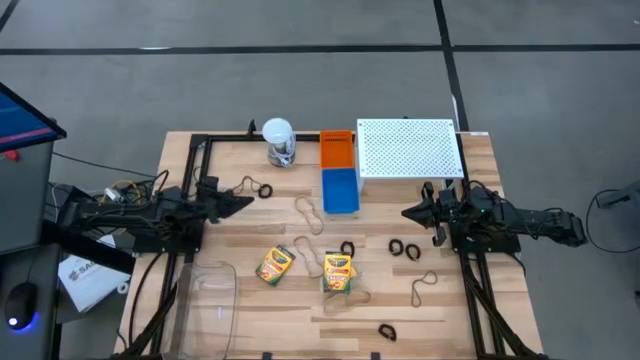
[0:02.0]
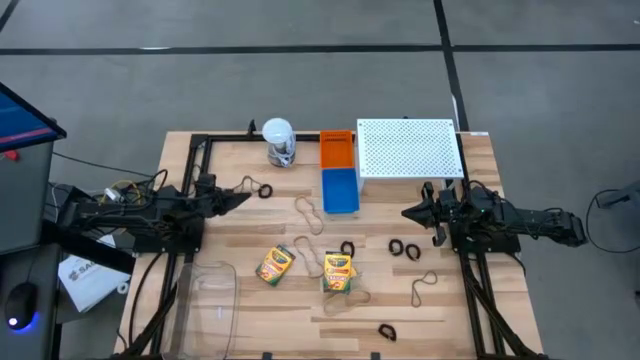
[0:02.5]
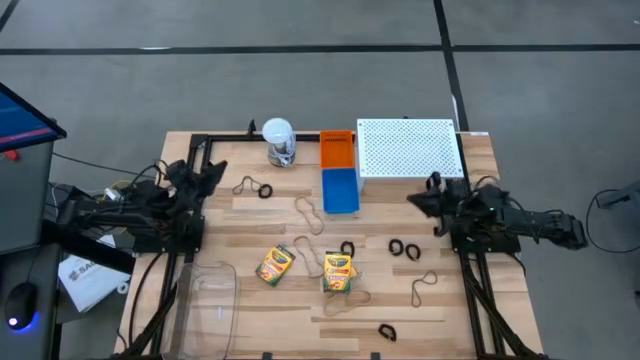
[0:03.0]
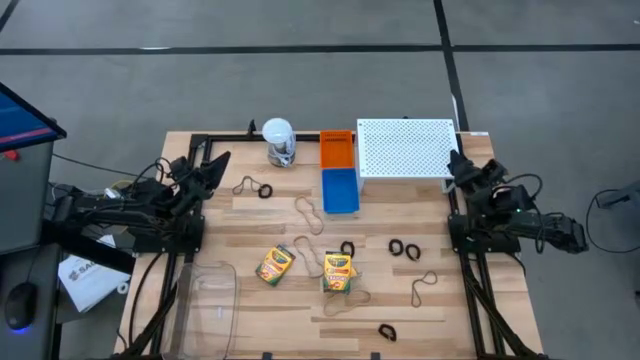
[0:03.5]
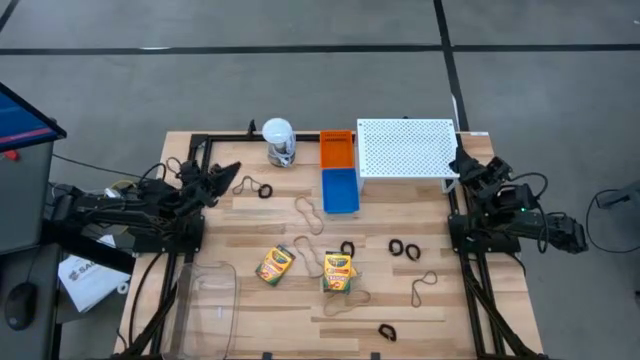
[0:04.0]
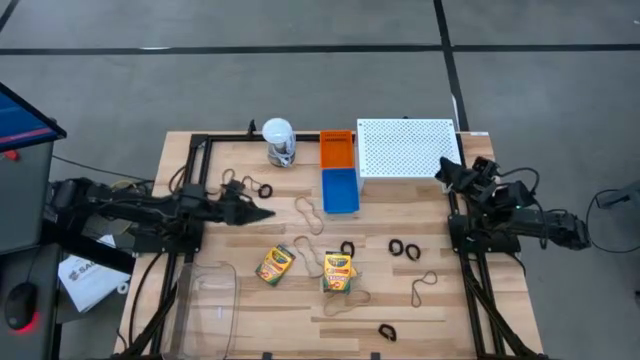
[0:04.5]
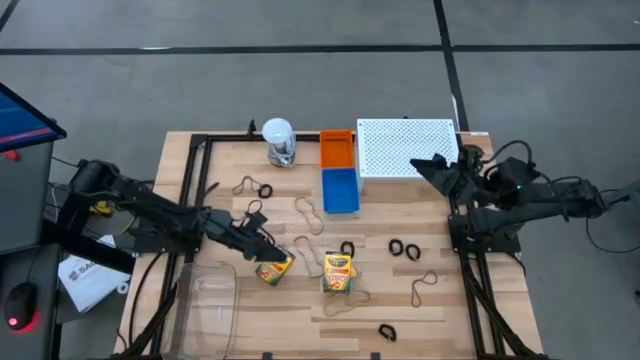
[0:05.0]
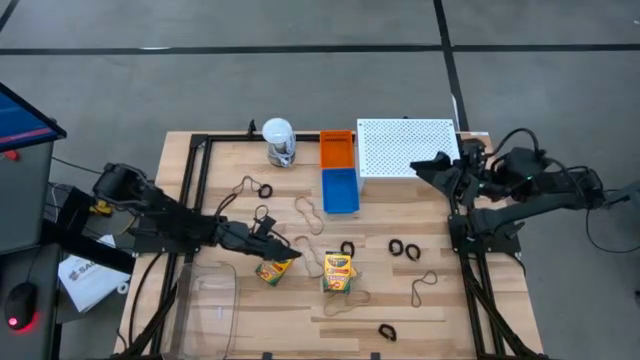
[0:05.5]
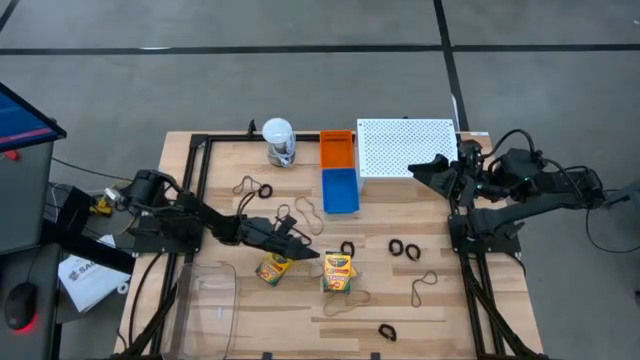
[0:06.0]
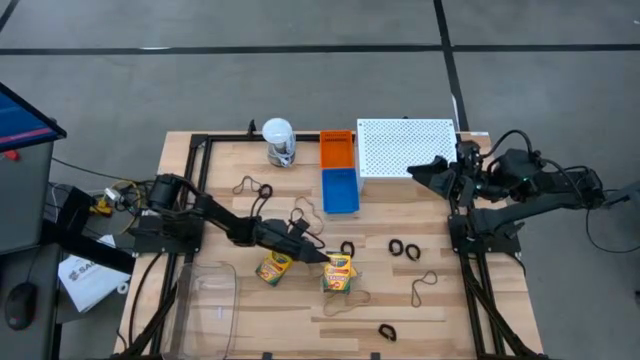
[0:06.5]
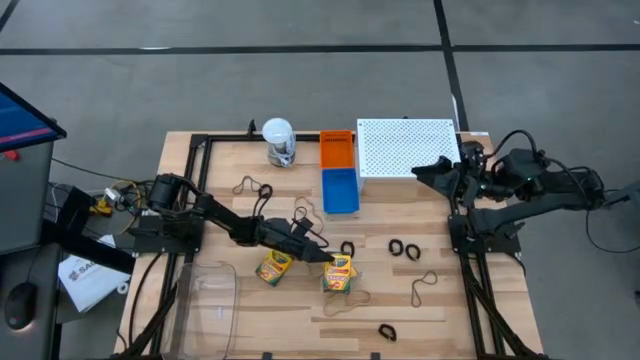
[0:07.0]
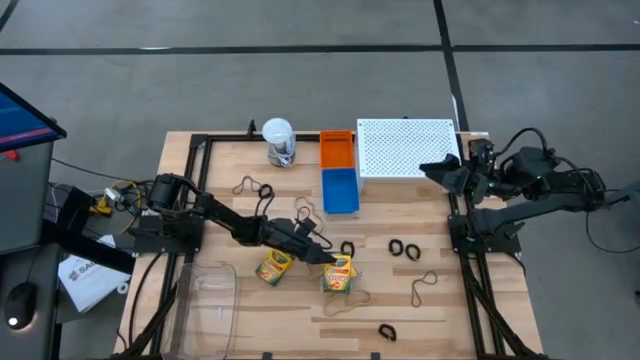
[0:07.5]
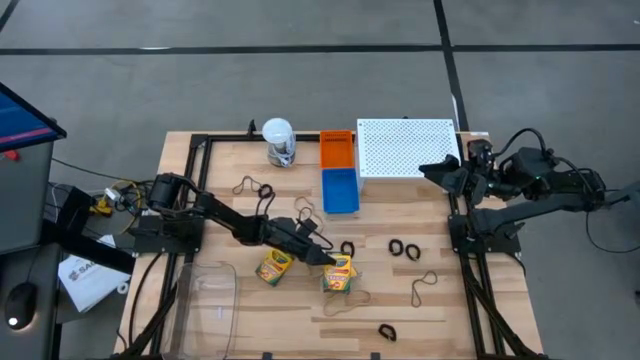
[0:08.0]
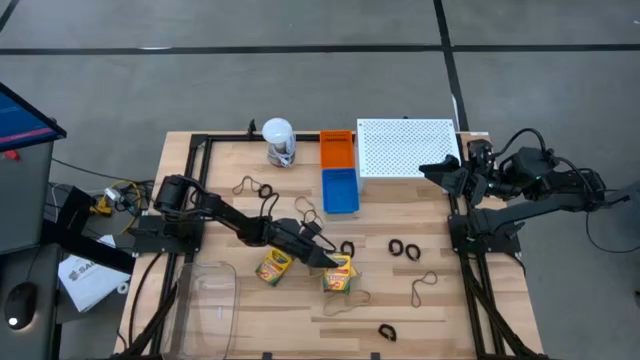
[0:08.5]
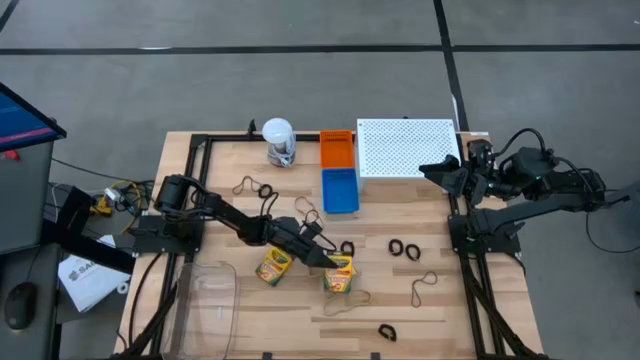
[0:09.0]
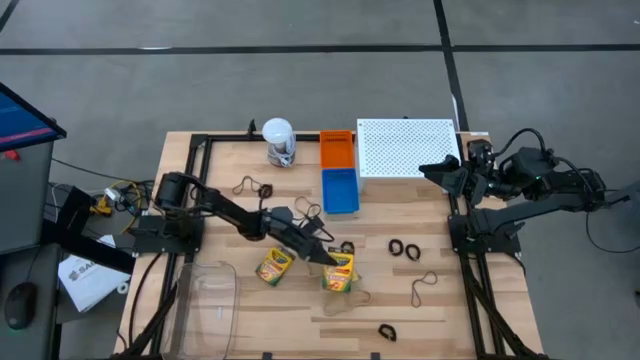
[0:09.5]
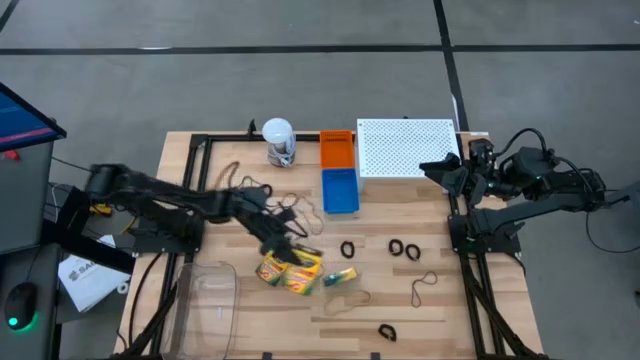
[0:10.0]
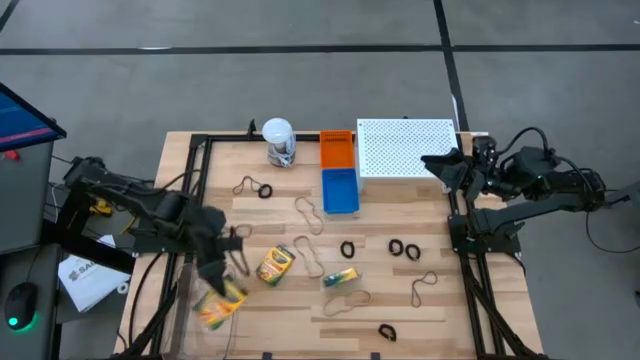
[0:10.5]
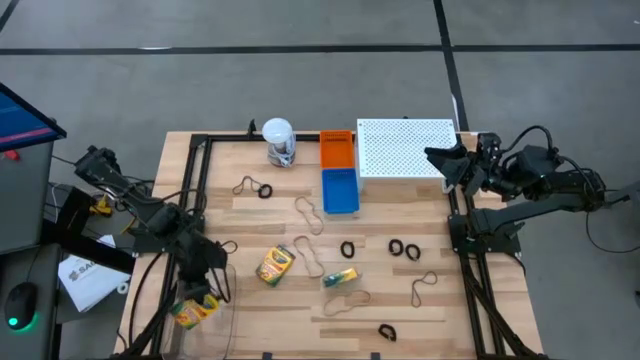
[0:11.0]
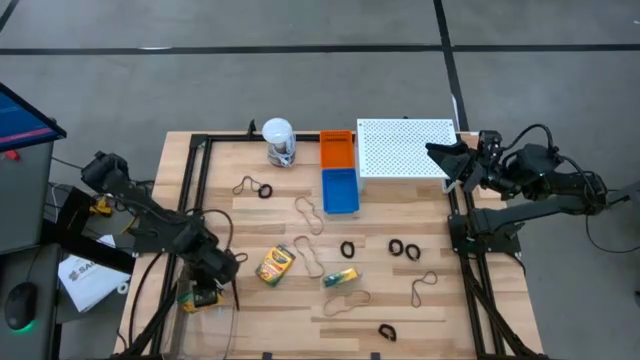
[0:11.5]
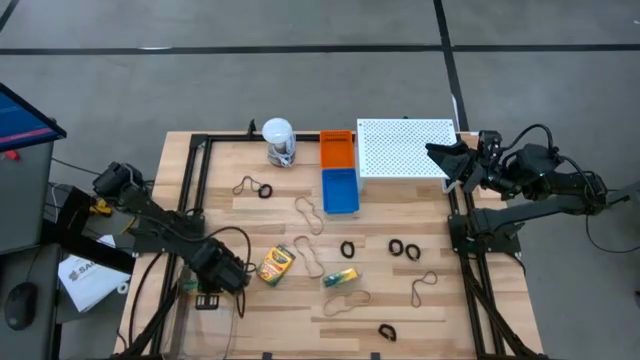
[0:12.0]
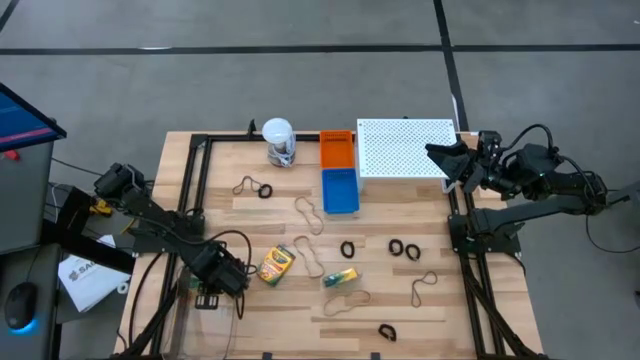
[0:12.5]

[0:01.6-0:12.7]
Task: Pick & Place Office Desk Supplies
Put the box of crayons into the transparent bin

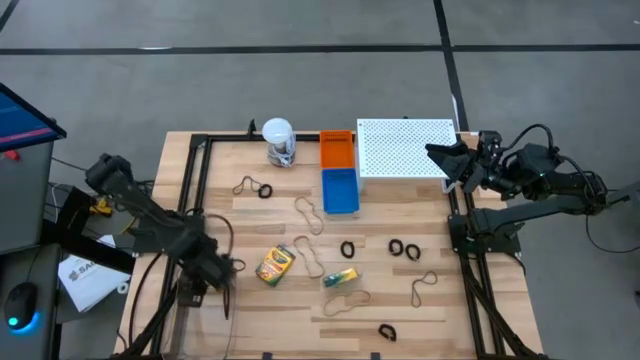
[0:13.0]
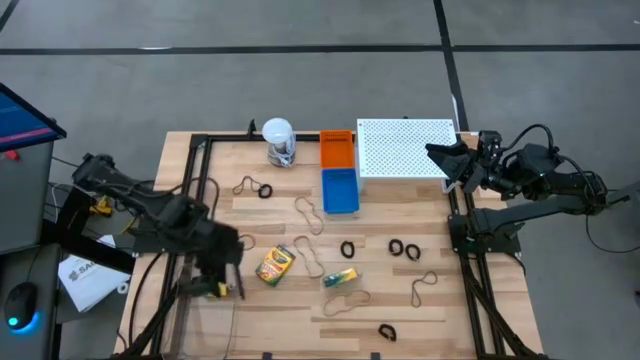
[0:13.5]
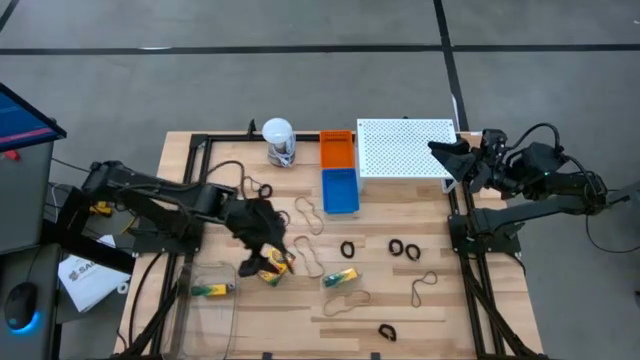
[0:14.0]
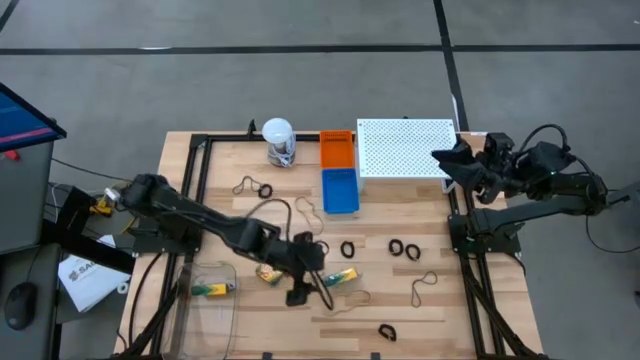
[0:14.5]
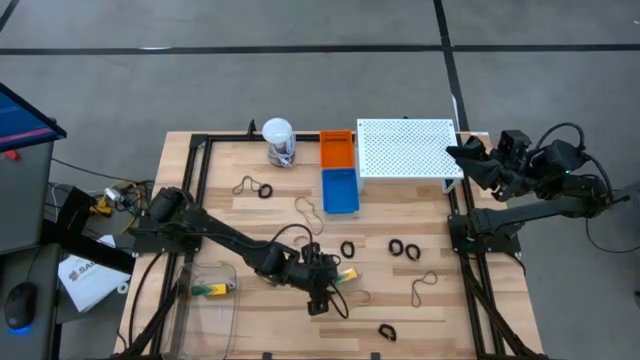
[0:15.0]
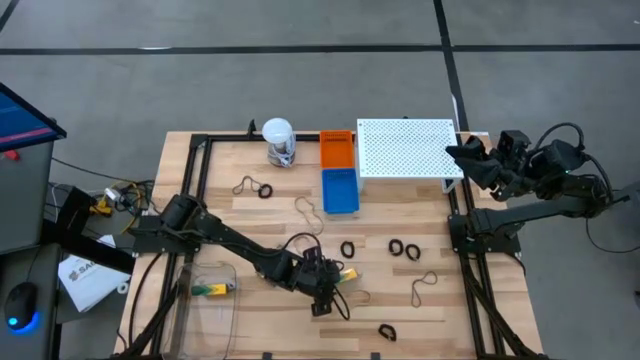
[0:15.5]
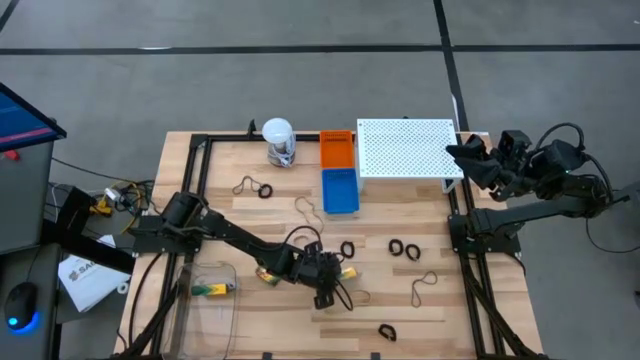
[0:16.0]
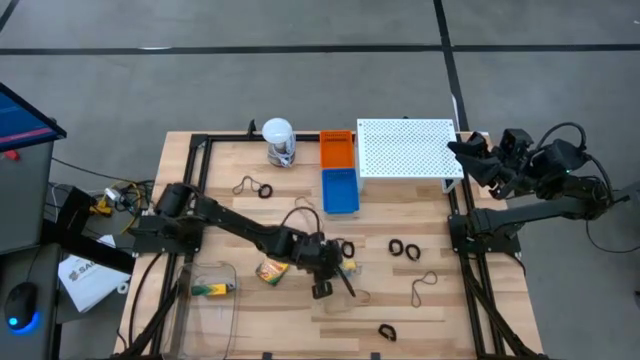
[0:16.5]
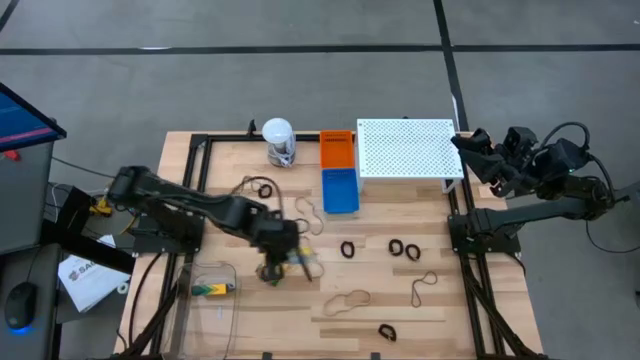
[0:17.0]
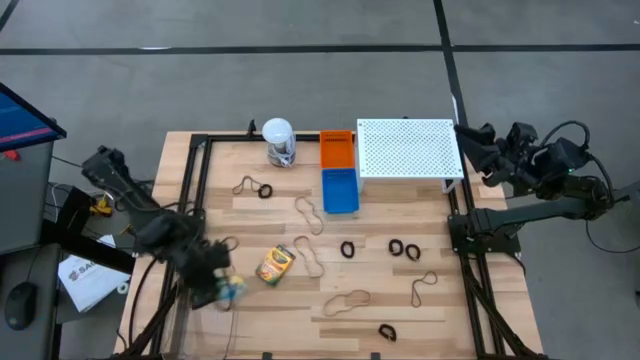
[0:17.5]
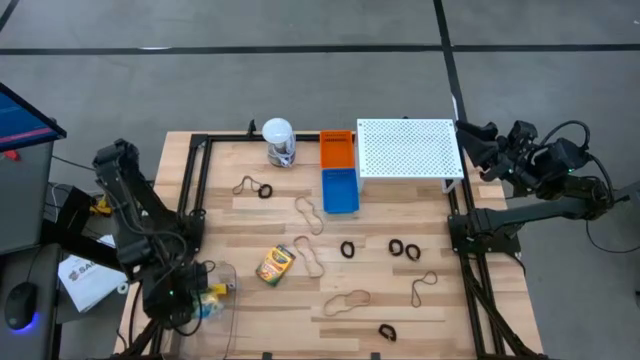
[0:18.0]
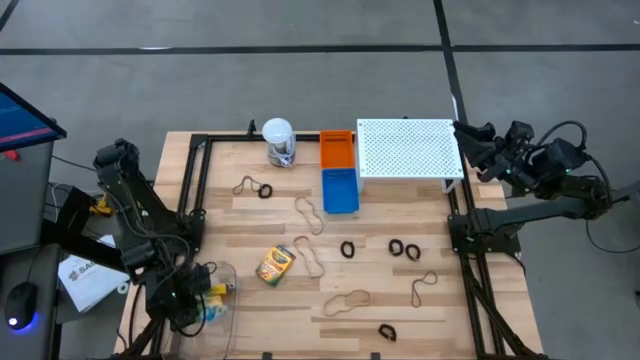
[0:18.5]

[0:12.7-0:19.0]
Put the box of crayons into the transparent bin

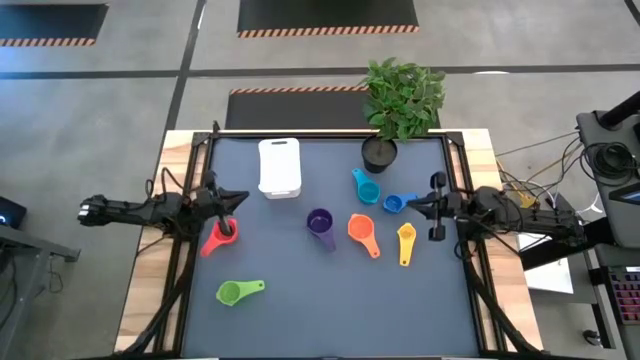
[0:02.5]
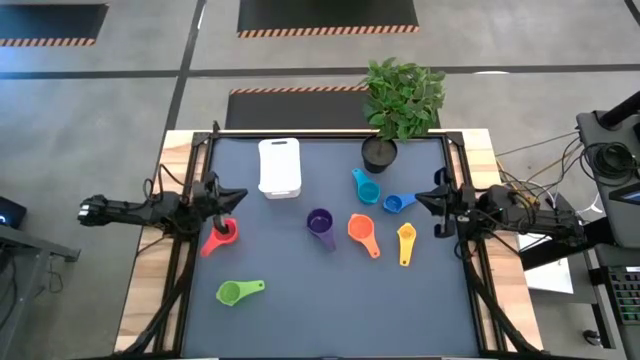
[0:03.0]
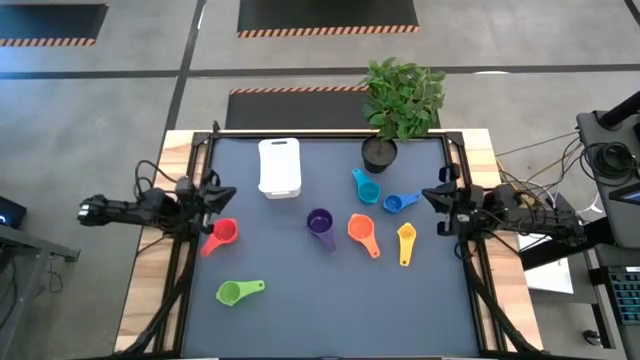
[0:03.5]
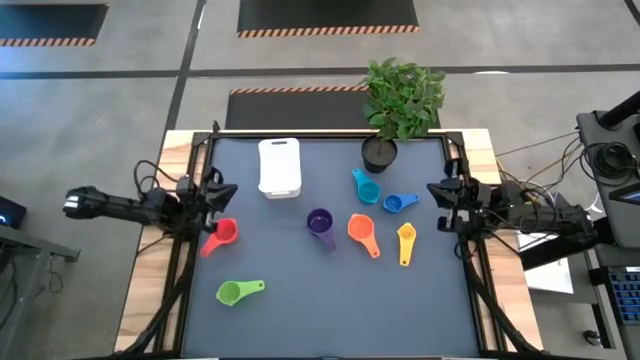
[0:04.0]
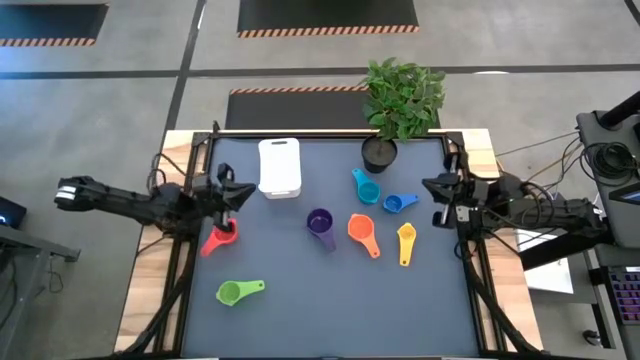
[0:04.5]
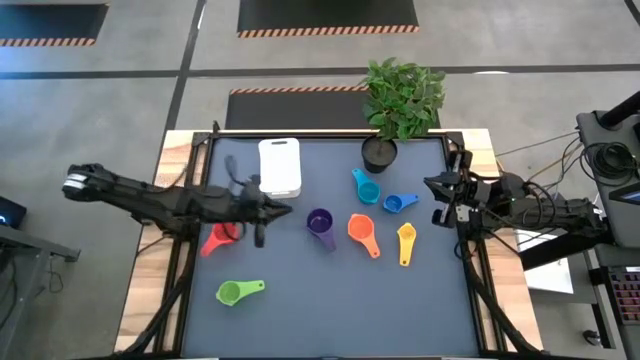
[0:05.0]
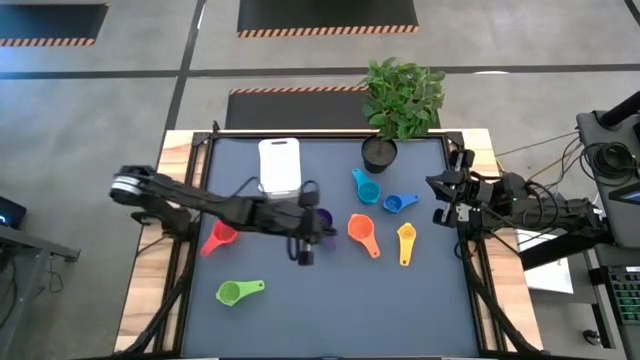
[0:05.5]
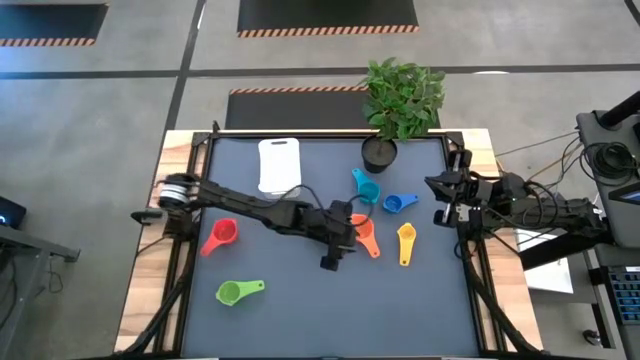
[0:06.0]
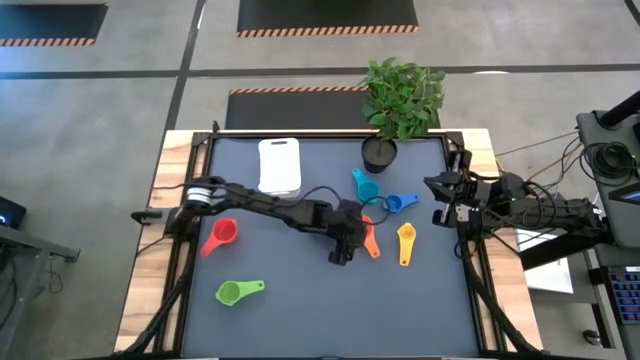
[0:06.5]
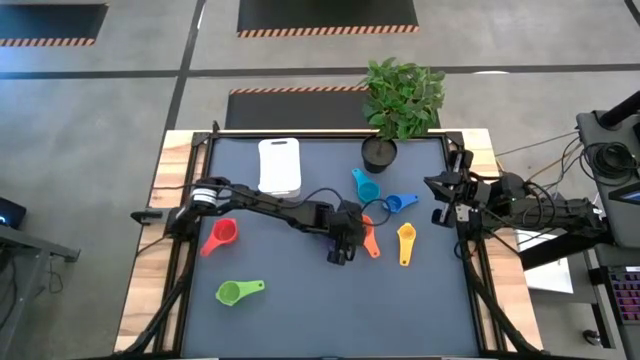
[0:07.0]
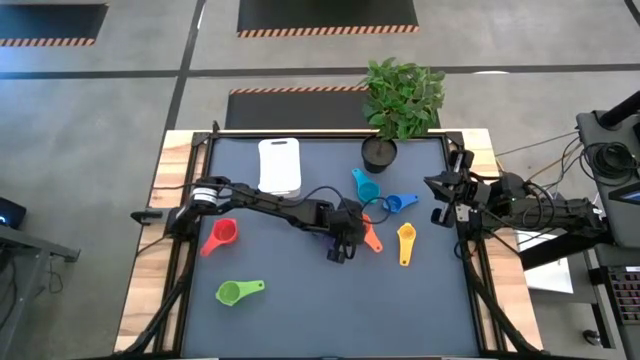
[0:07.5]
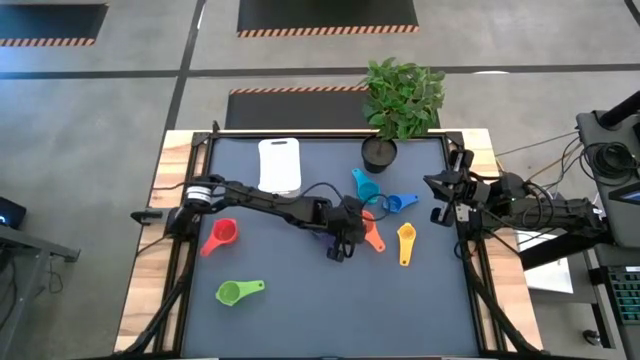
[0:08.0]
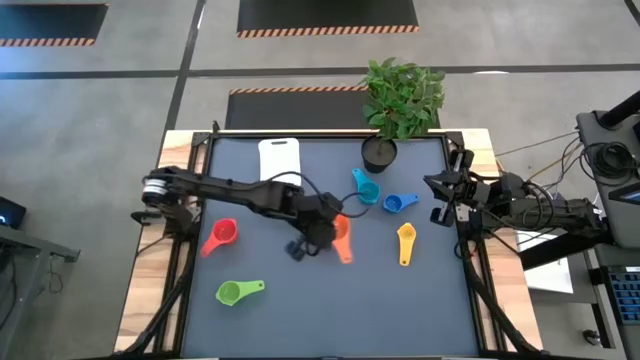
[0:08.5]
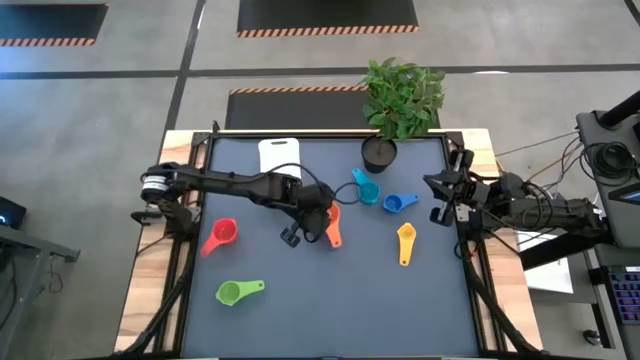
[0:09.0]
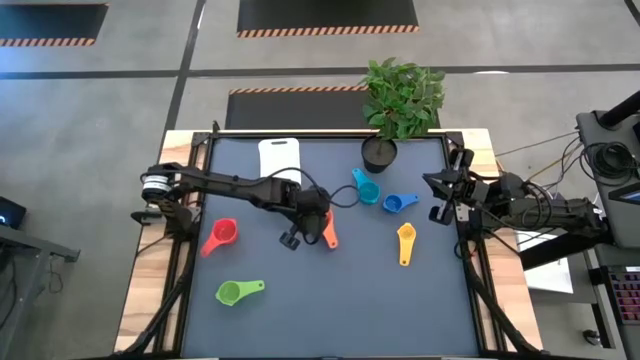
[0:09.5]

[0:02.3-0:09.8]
Task: Nest measuring cups in basket
Stack the light orange measuring cup on top of the purple measuring cup
